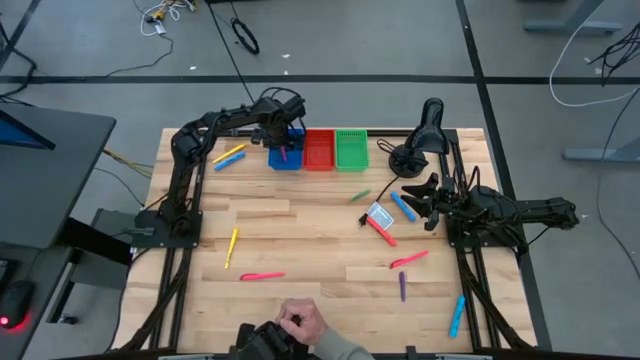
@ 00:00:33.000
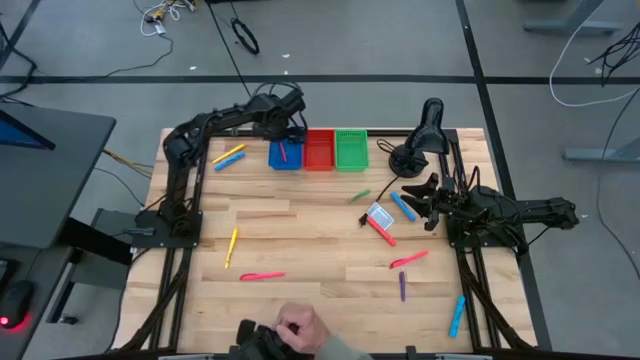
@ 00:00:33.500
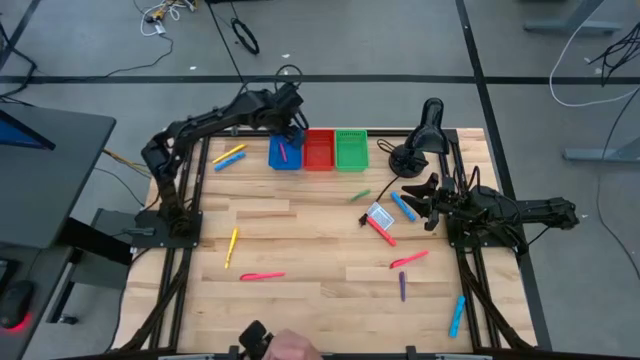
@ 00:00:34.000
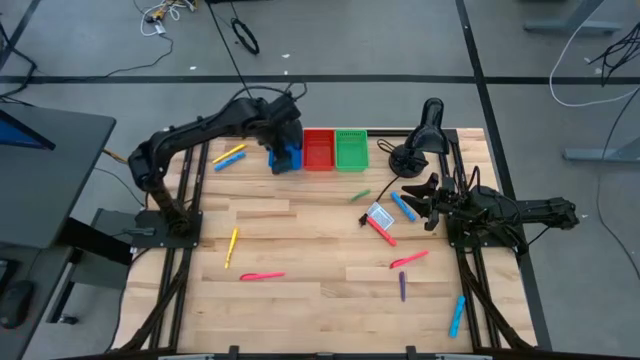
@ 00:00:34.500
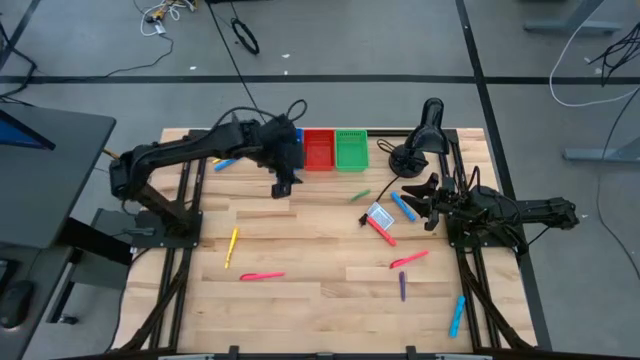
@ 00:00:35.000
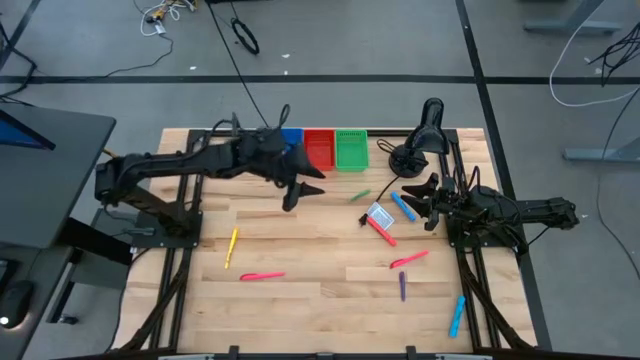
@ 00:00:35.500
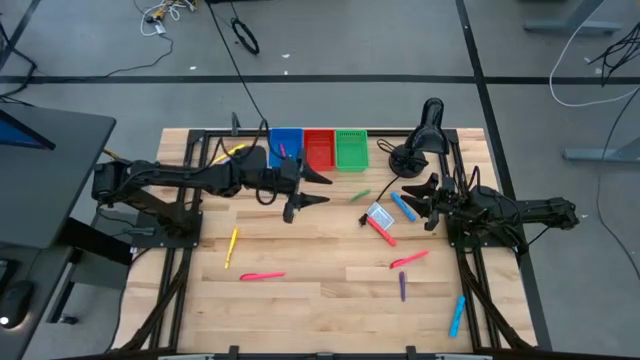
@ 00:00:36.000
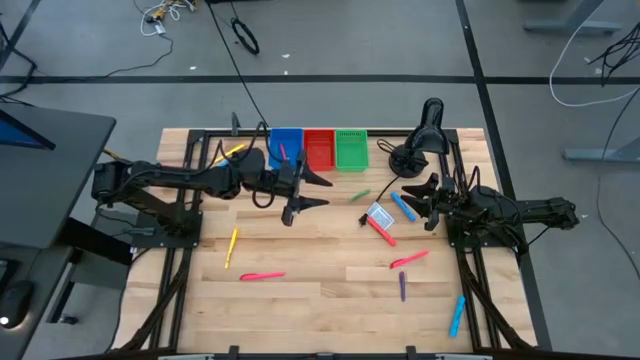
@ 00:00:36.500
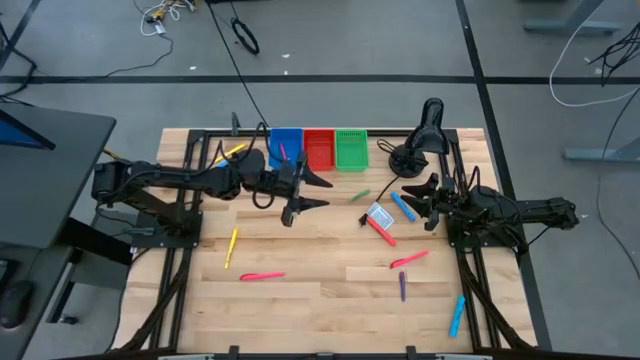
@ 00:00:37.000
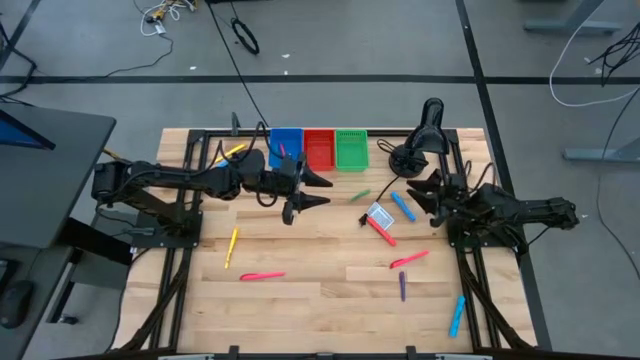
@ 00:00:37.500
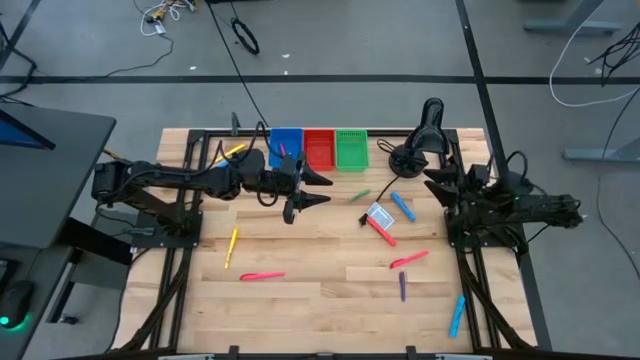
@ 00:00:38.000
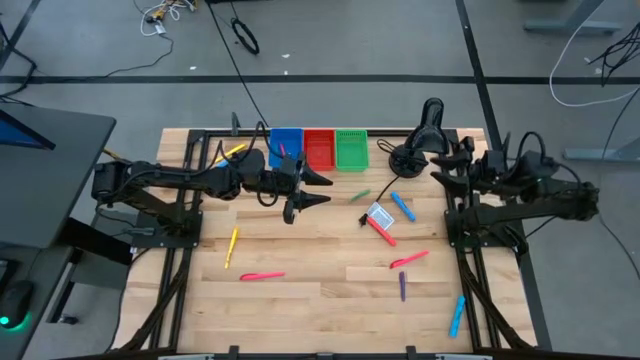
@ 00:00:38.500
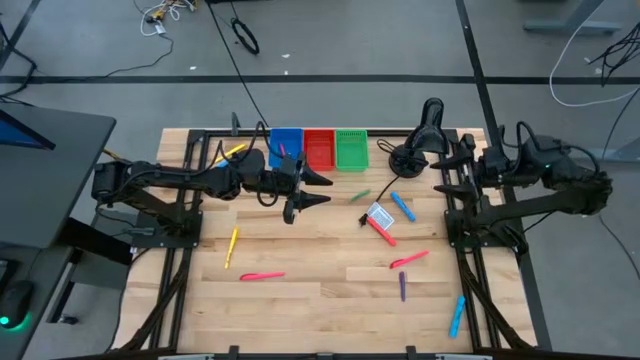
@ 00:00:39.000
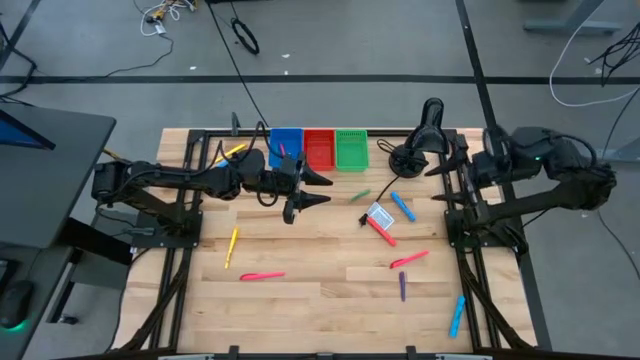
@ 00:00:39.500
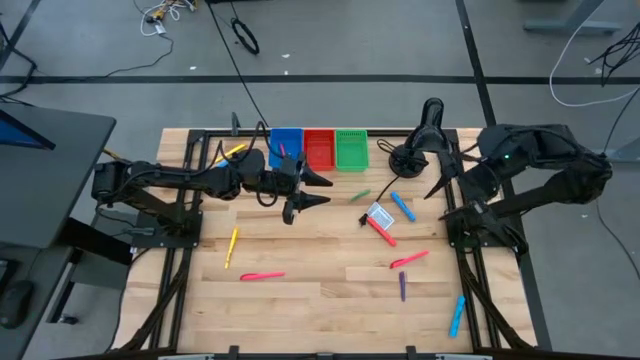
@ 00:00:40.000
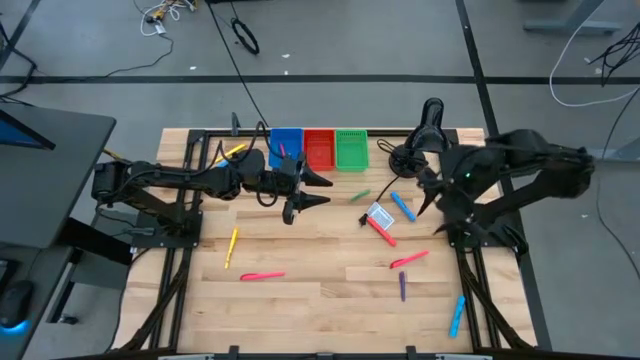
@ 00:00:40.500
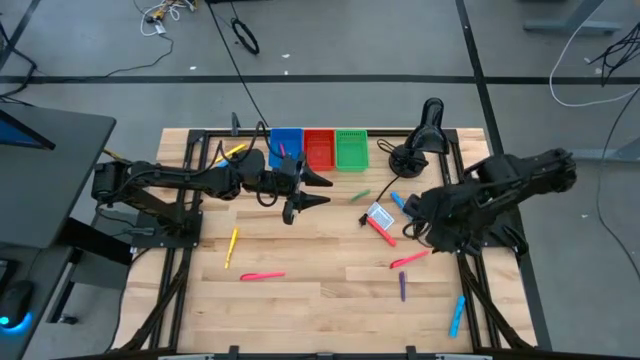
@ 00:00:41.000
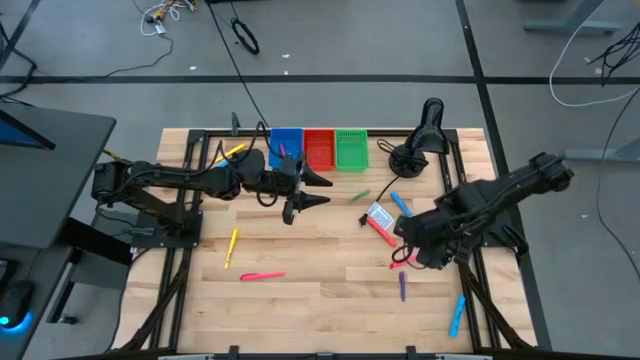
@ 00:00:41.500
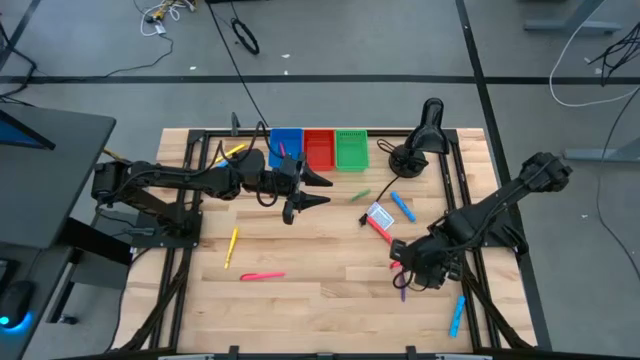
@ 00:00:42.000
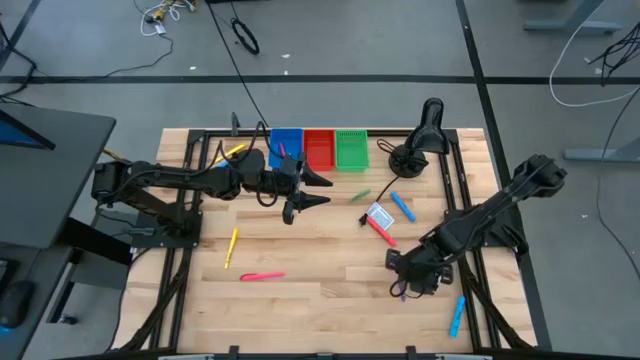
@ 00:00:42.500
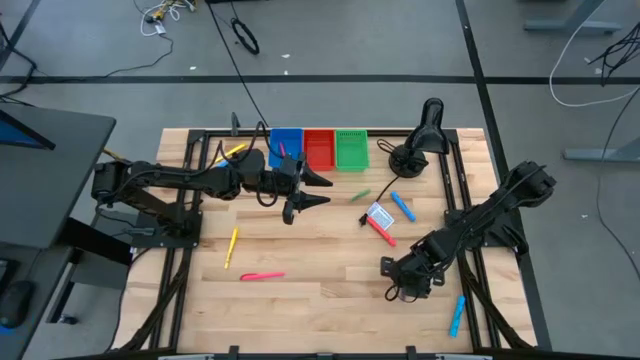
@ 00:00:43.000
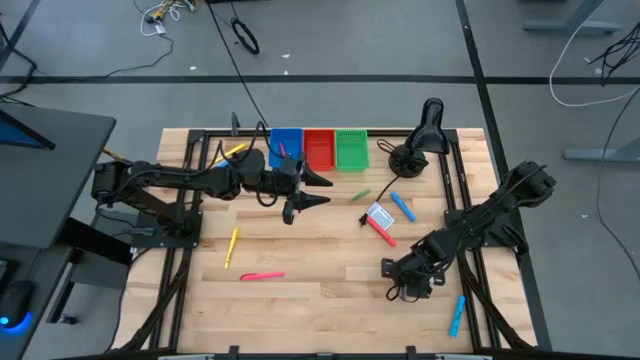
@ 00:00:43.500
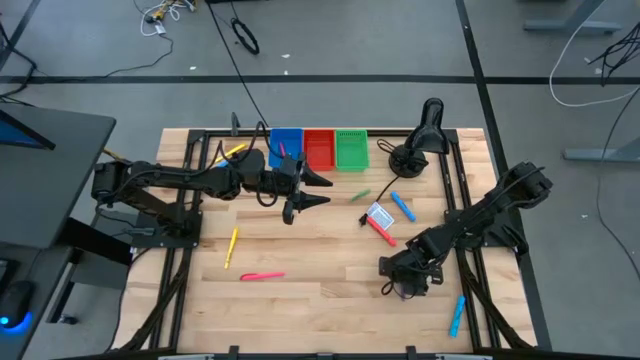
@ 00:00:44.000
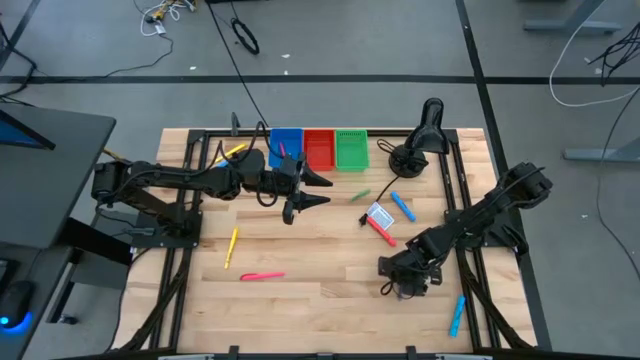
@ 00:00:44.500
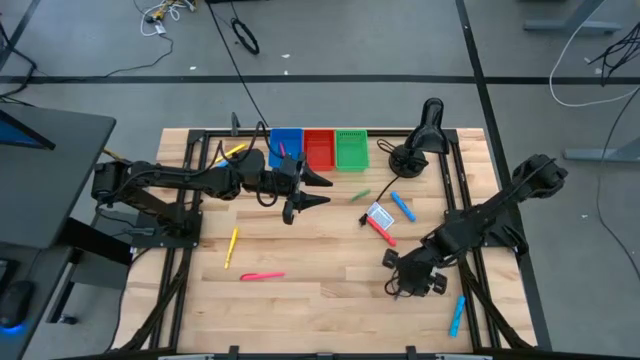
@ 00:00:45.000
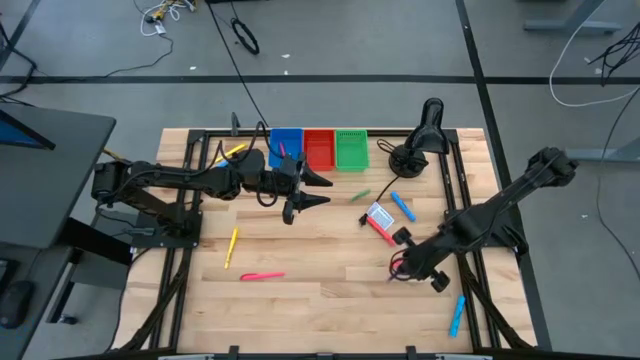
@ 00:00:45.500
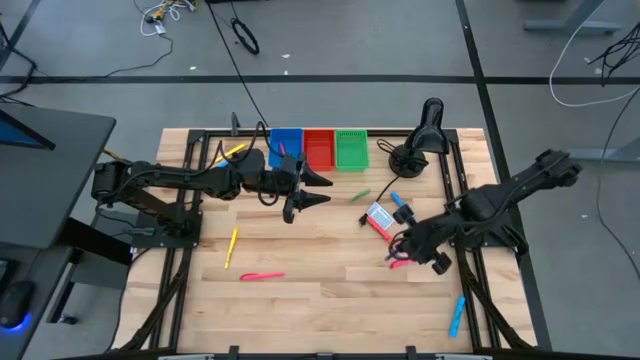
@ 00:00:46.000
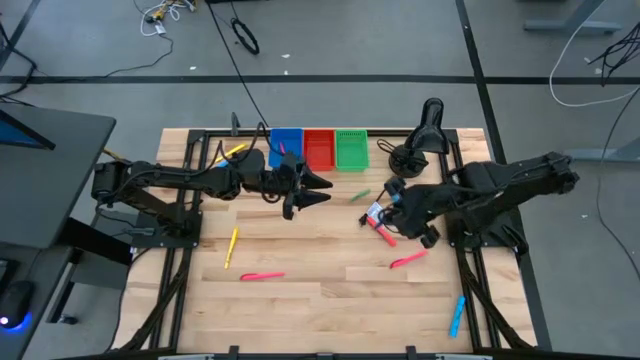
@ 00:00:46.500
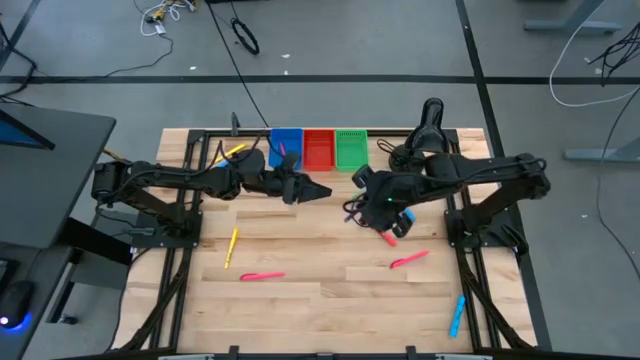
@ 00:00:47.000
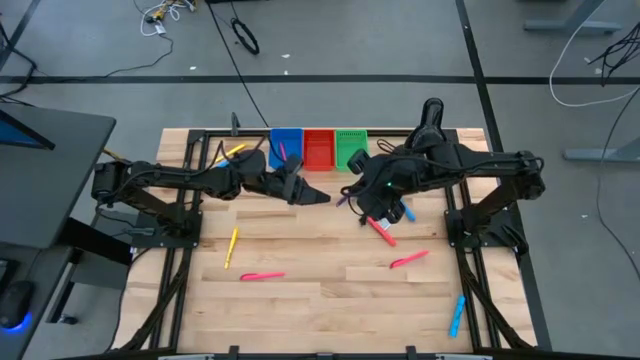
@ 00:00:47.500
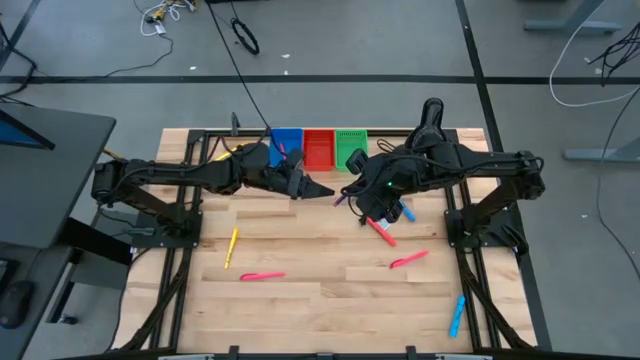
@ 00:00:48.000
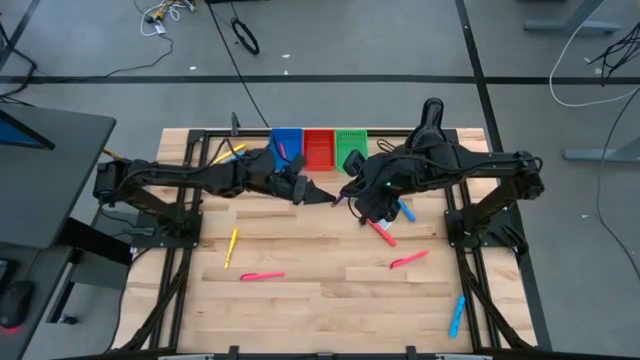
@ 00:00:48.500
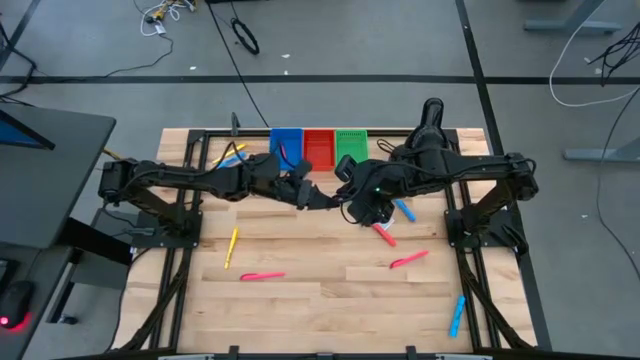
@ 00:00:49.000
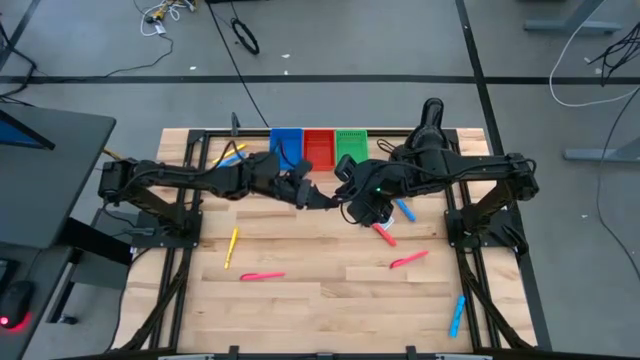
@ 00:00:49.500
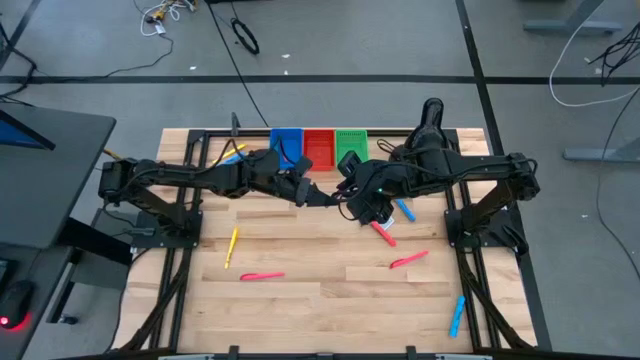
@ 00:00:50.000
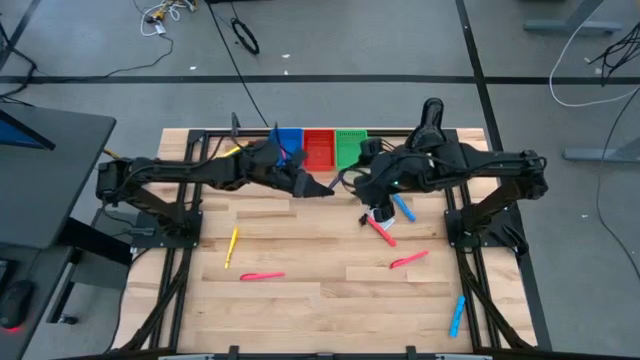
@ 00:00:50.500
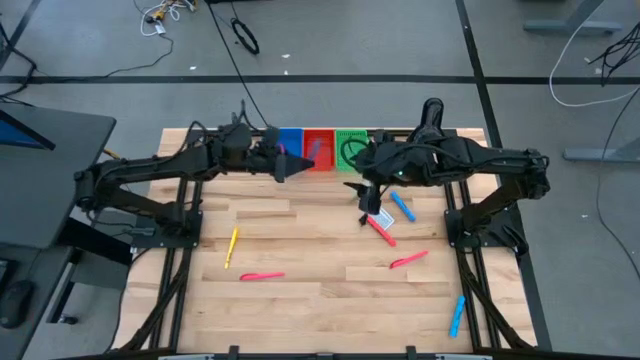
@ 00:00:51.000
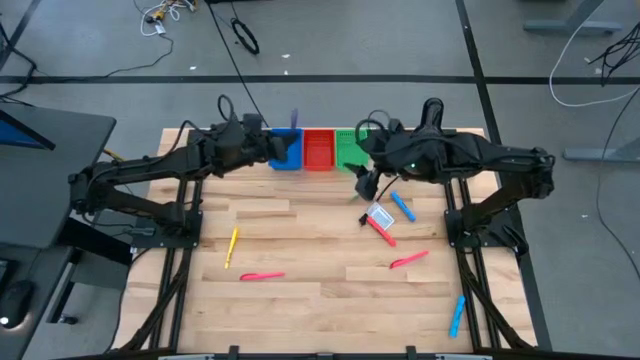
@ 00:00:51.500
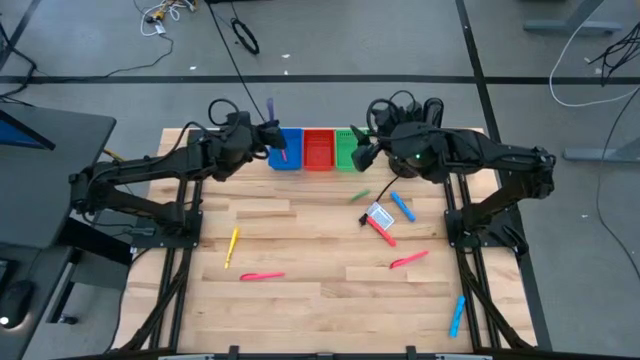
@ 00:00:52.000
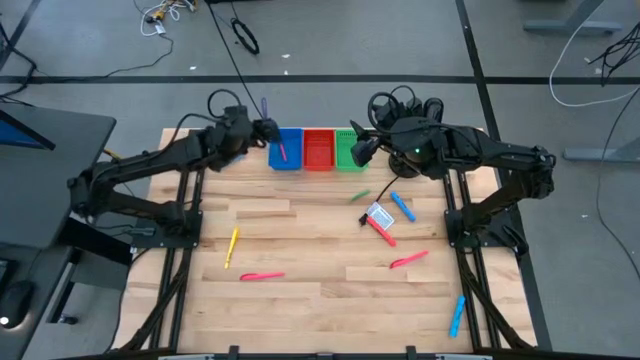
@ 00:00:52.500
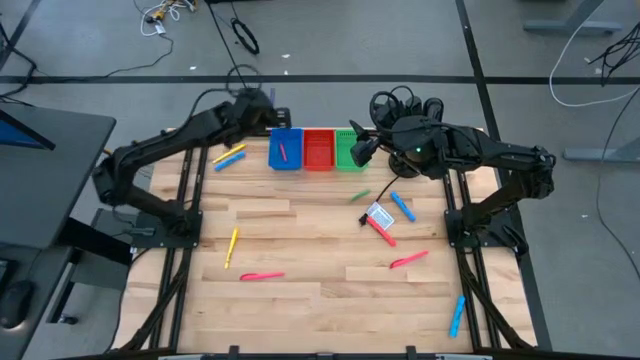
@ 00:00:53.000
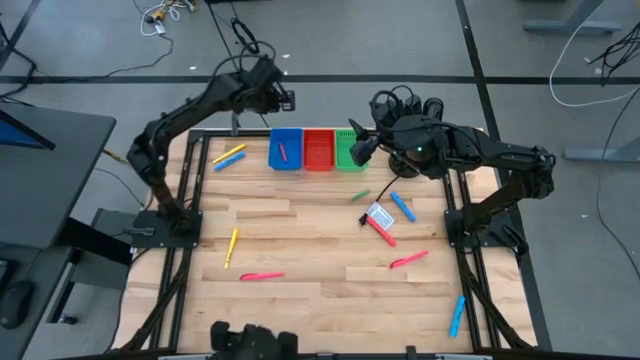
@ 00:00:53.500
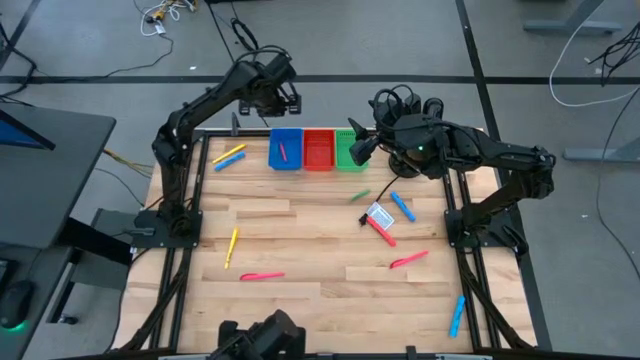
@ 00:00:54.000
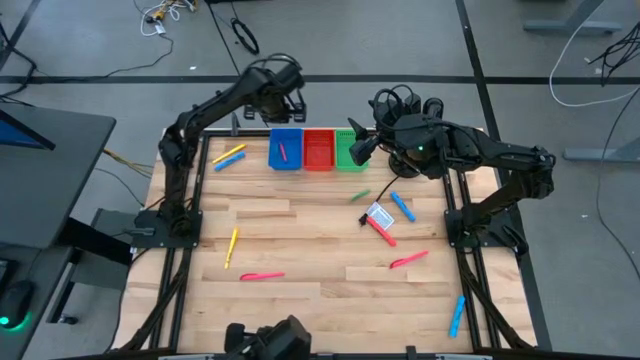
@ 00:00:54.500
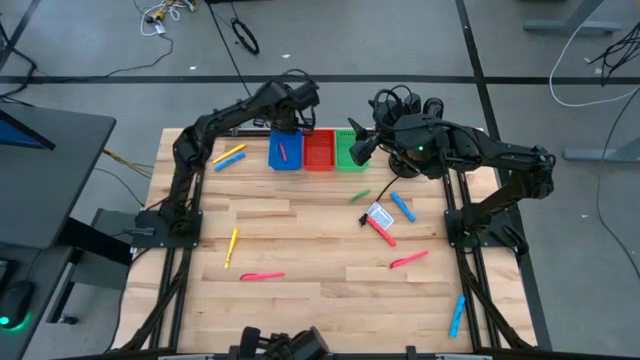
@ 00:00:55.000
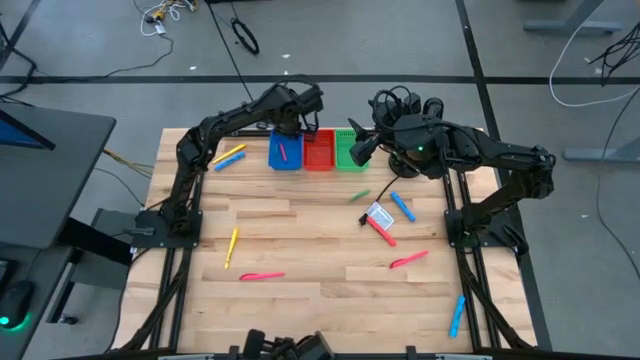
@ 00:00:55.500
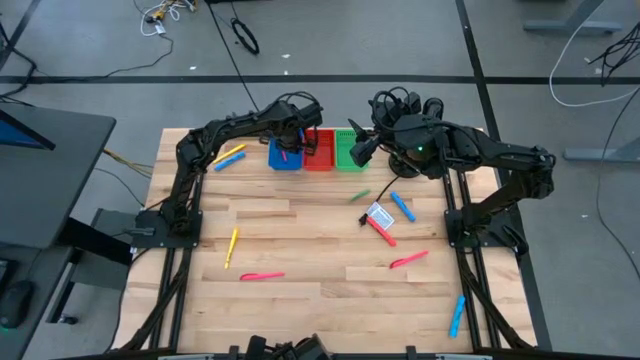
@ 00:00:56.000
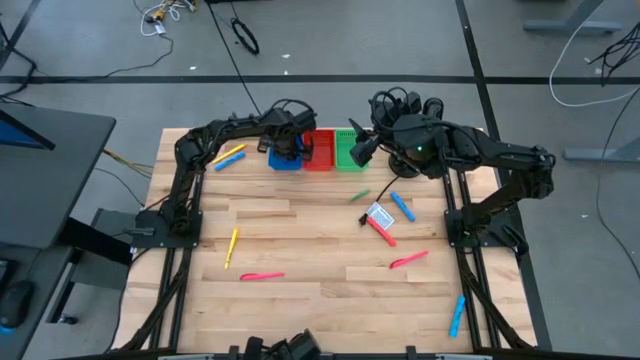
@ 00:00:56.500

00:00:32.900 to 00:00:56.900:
Task: Pick & Place Markers
Put the violet pen into the blue bin
